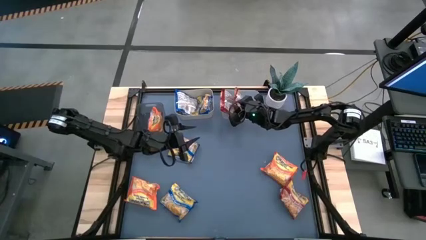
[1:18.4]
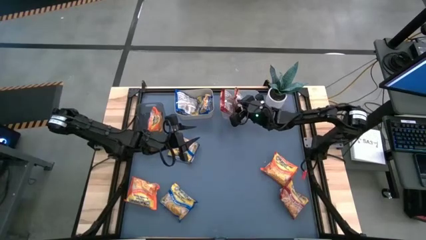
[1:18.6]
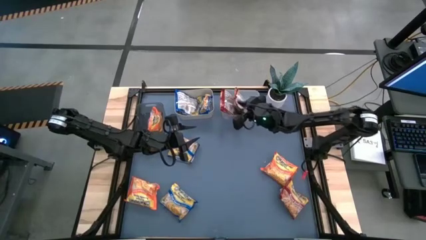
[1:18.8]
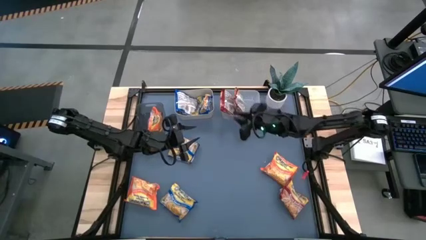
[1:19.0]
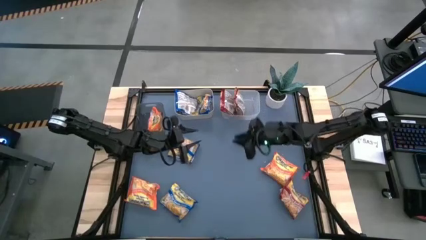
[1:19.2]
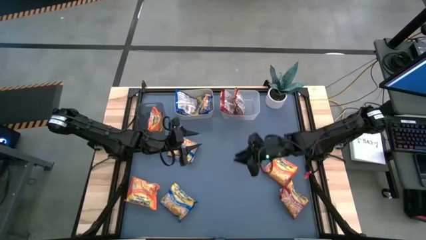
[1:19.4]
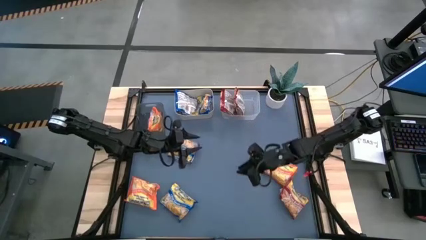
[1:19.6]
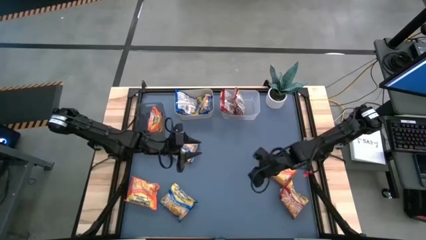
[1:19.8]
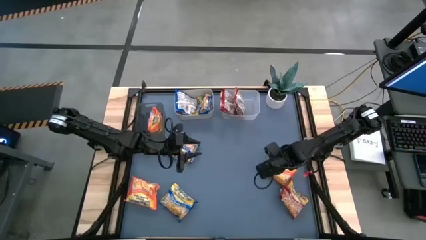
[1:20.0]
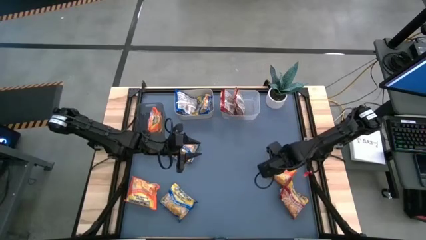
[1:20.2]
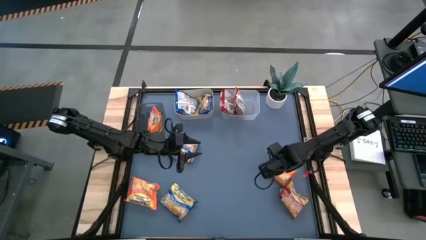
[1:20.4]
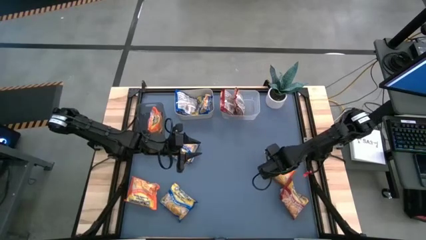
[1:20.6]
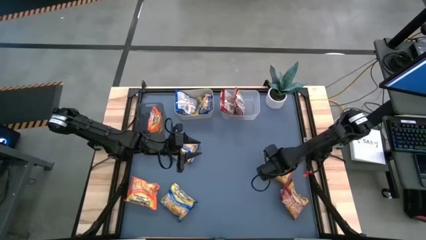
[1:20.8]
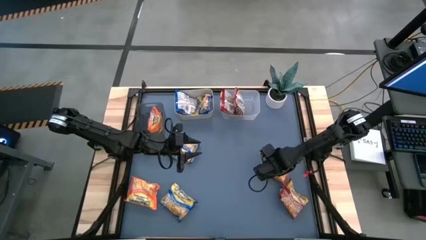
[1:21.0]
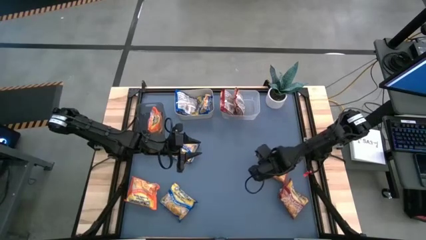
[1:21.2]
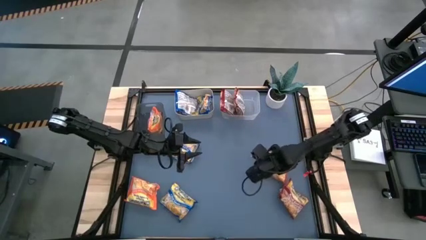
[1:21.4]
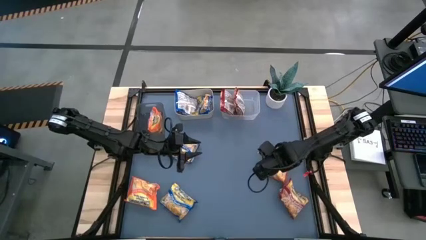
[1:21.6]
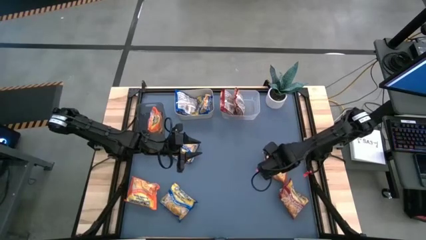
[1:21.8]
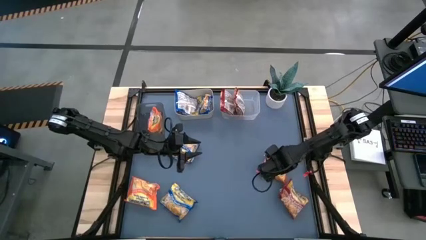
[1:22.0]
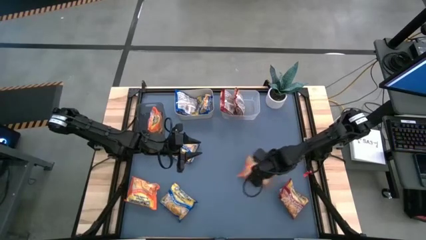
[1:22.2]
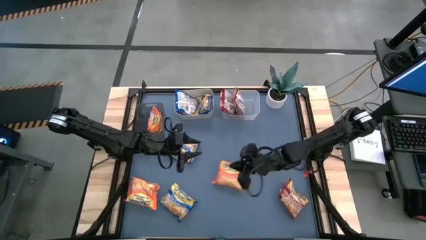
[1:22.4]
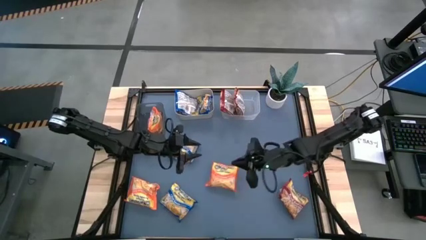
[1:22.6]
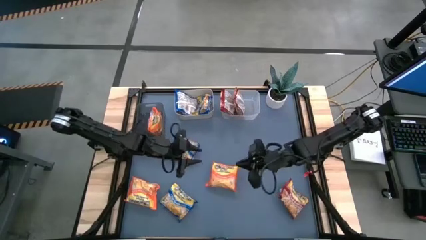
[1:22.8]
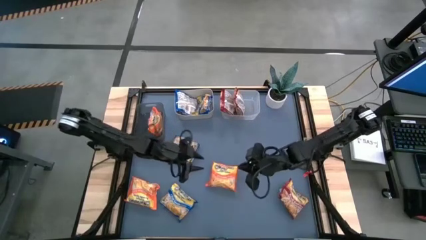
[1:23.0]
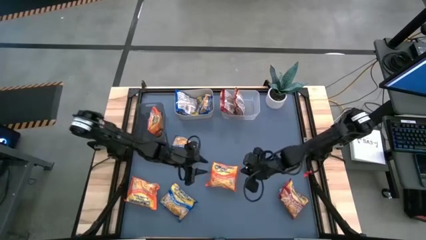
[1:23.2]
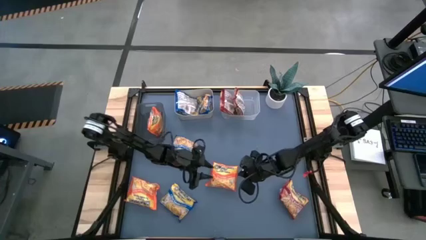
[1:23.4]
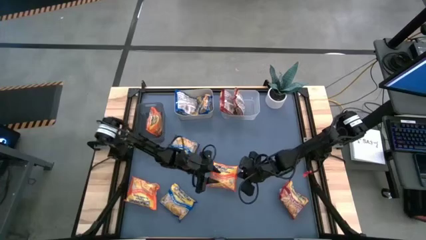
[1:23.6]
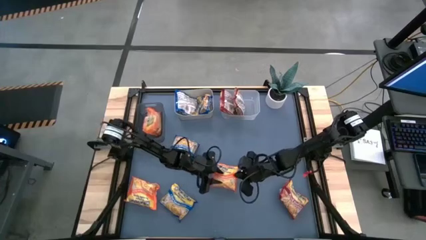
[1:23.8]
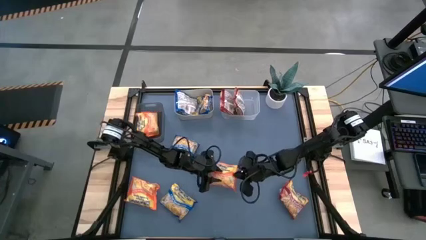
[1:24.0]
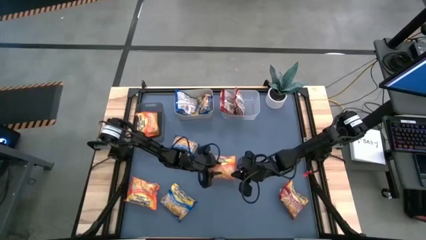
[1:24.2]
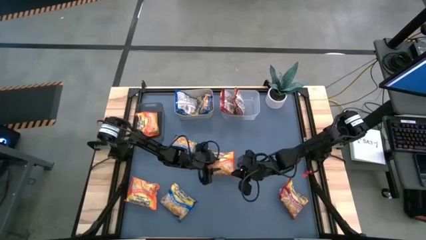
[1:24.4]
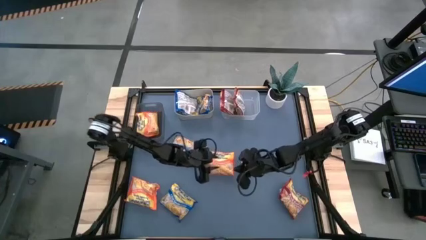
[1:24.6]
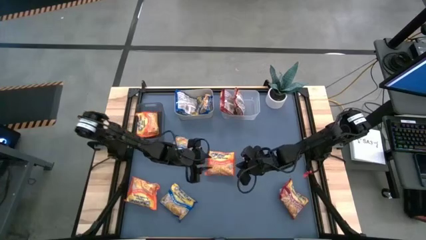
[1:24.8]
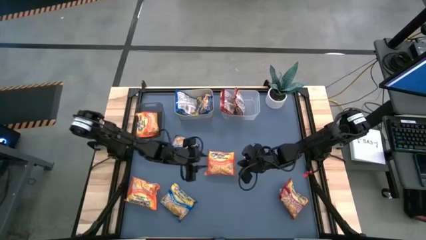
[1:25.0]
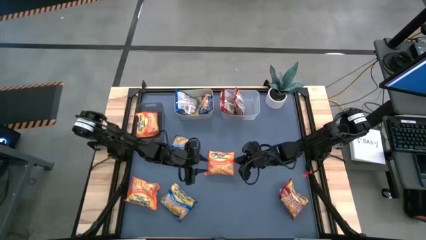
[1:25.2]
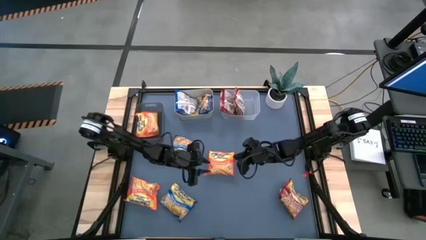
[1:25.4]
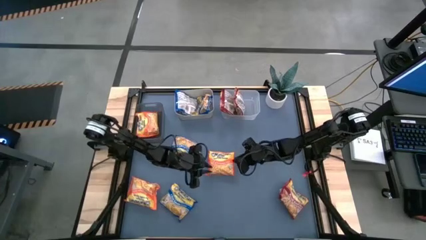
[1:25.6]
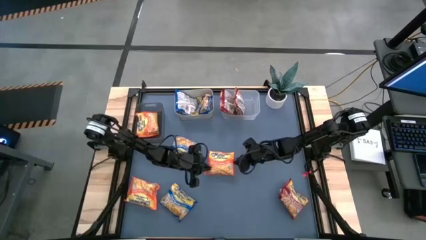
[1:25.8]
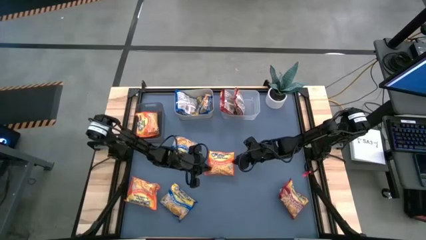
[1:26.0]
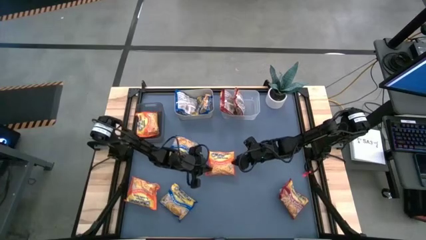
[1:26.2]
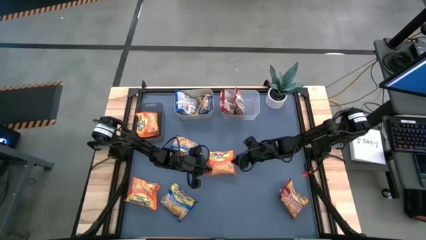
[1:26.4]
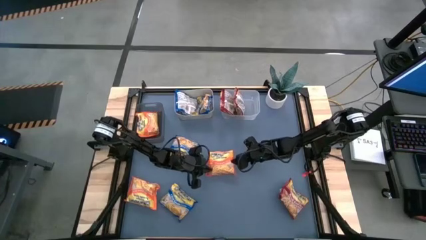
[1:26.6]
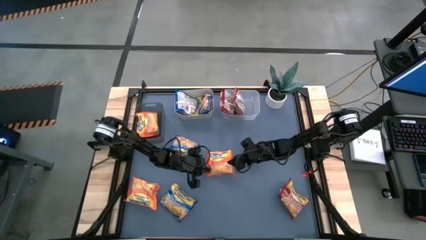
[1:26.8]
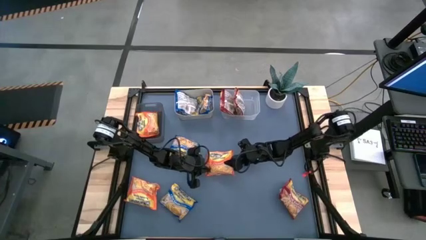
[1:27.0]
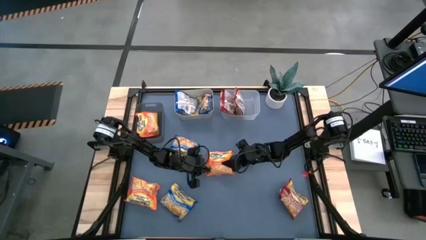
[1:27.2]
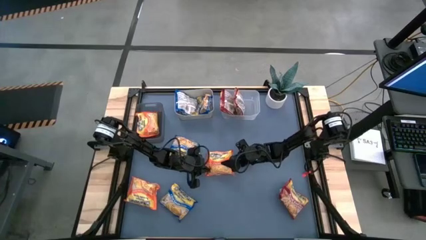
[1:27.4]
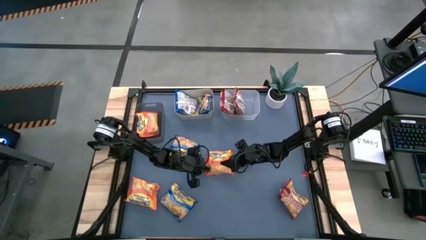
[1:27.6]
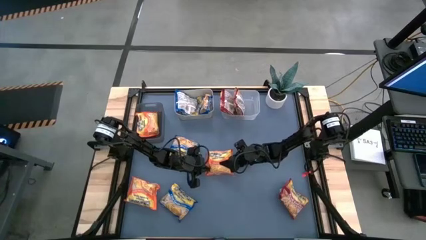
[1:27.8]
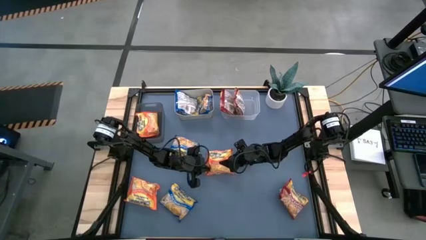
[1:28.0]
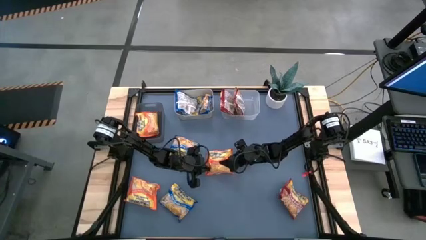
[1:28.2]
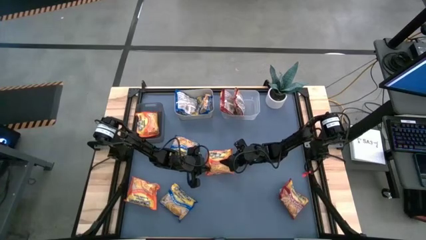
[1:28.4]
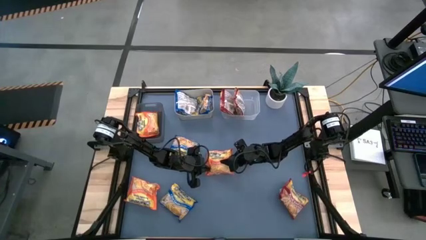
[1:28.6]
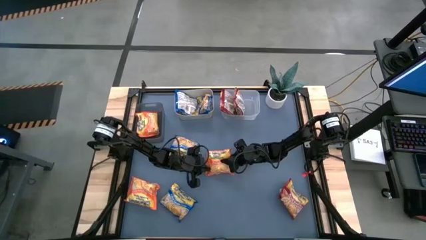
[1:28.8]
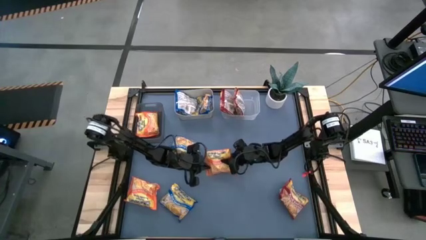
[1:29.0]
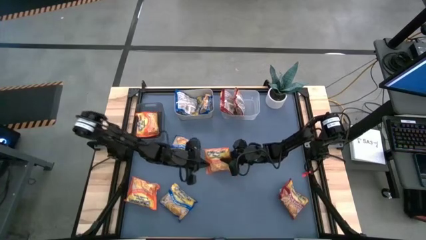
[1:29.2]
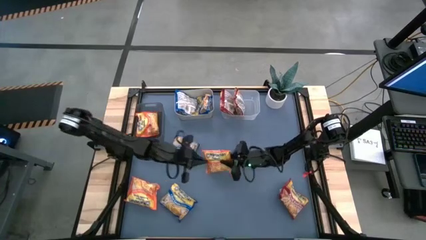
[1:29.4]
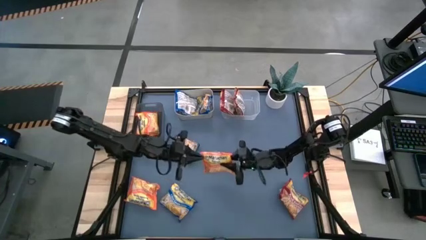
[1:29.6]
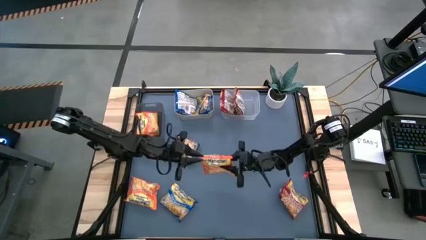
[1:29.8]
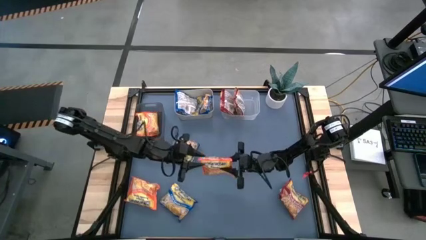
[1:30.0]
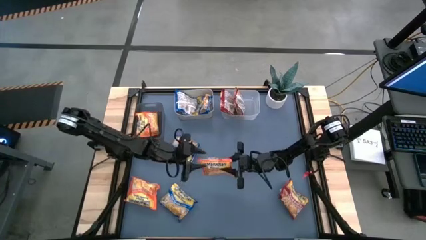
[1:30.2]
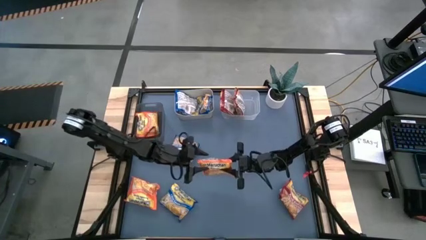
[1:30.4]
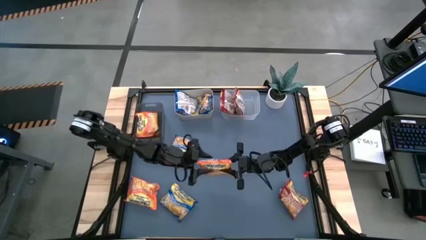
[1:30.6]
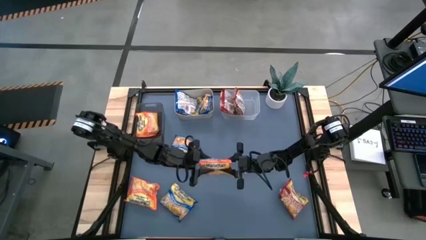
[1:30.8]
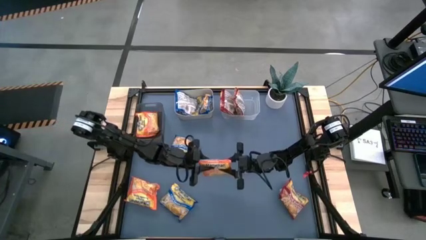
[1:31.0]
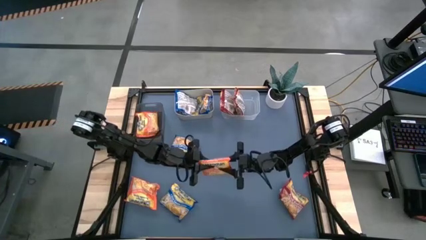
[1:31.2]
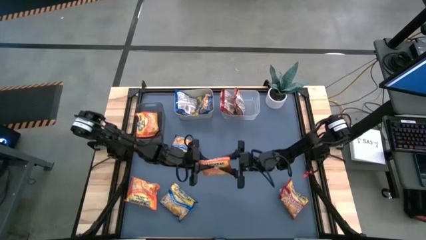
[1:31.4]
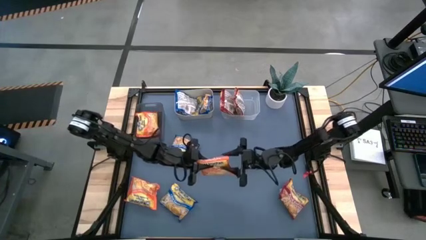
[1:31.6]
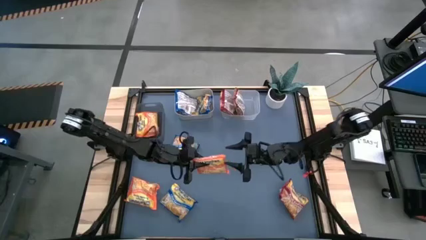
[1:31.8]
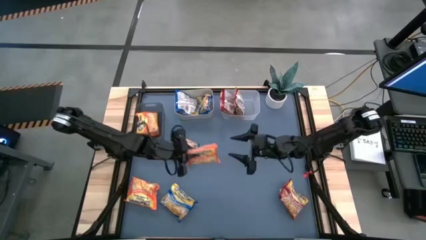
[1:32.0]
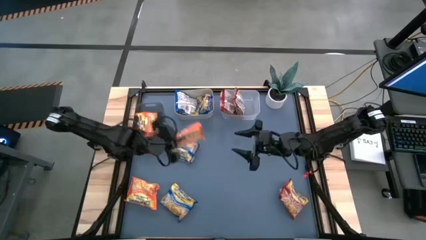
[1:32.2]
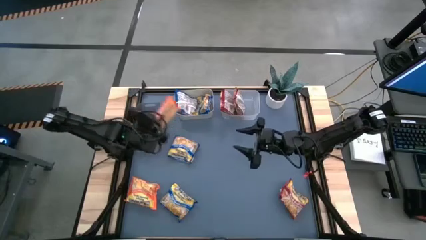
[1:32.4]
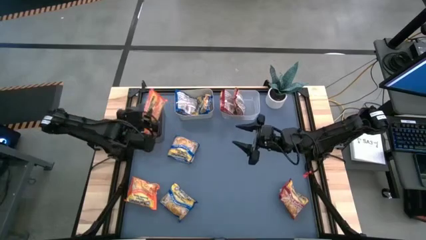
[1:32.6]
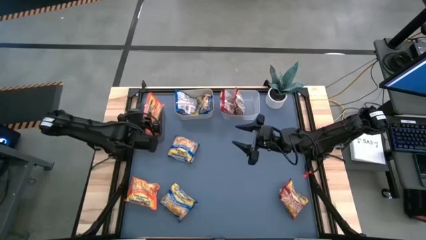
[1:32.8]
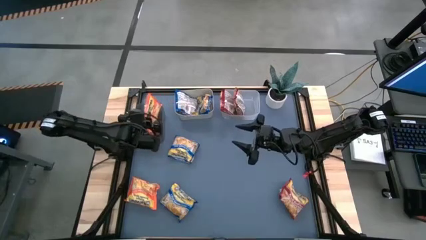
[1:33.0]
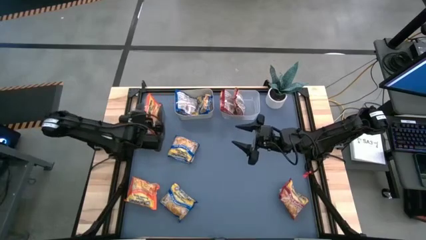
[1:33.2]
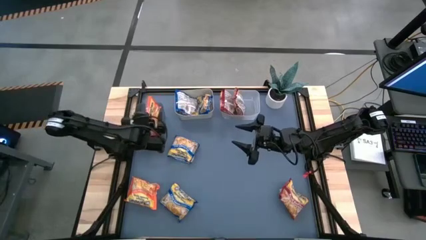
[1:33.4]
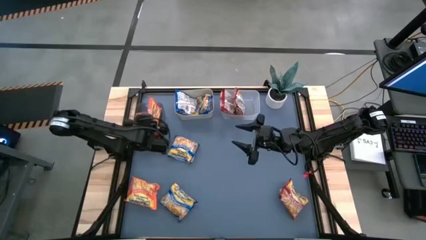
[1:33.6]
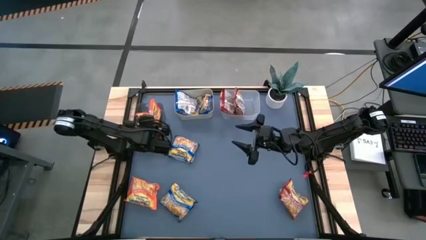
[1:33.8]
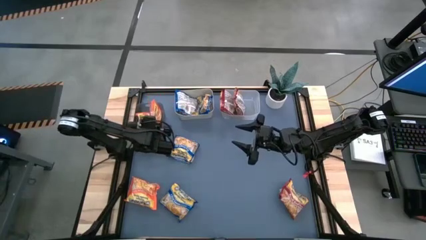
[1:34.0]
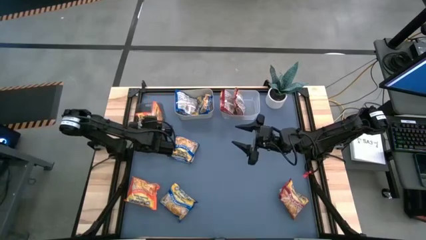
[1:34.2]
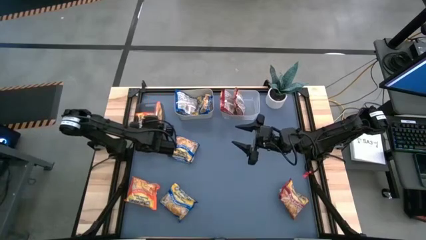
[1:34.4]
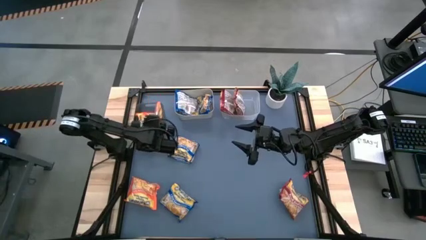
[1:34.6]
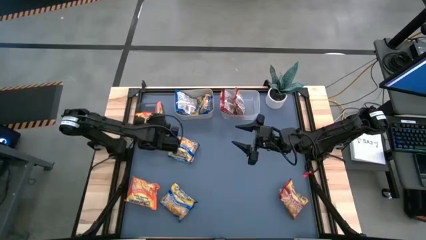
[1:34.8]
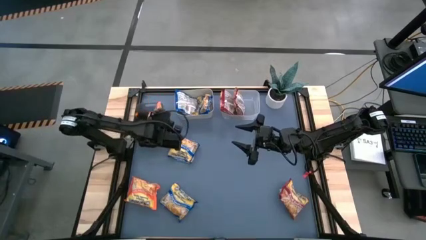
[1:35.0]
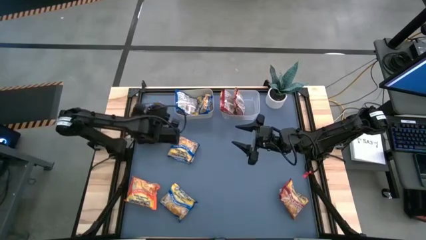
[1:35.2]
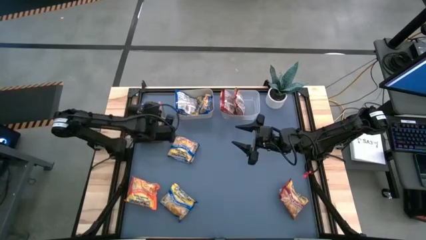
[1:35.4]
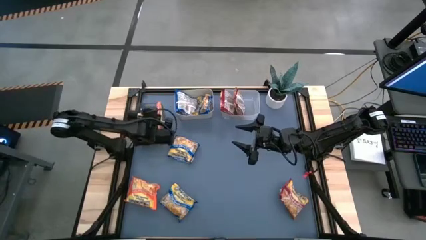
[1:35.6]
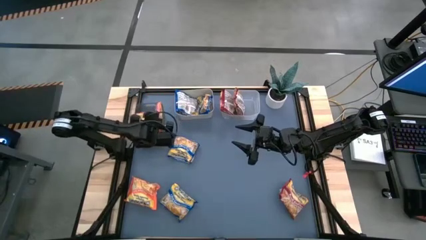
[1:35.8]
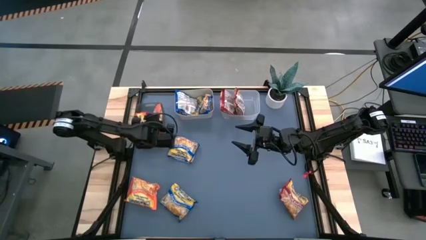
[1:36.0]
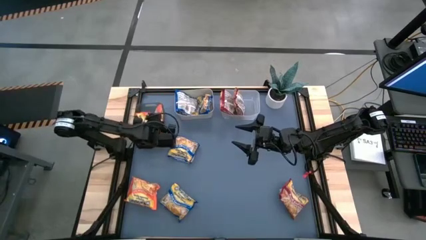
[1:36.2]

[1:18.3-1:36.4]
Task: Sort Maruchan noodles
Put the orange noodle pack into the black bin
